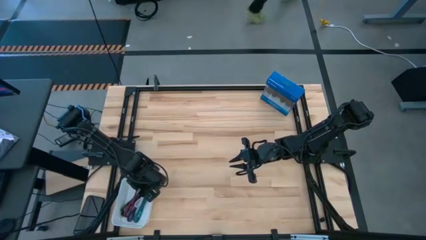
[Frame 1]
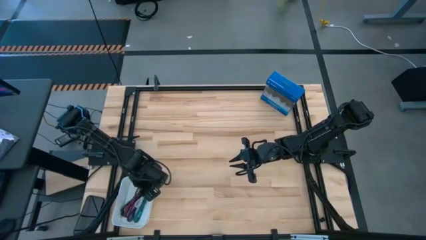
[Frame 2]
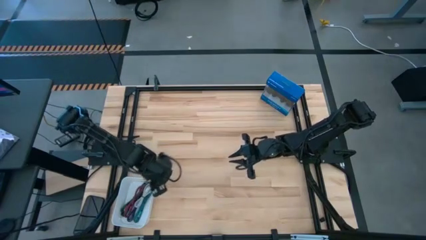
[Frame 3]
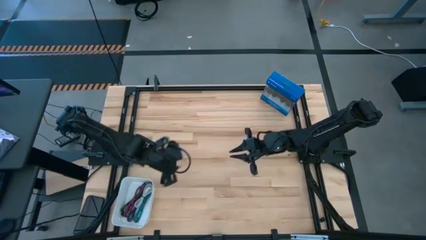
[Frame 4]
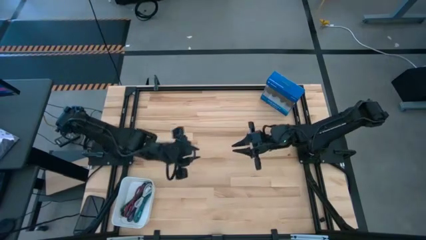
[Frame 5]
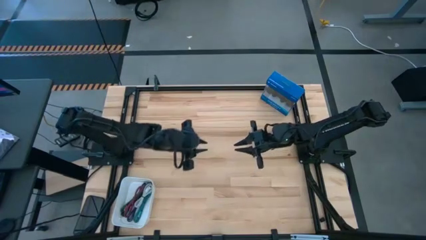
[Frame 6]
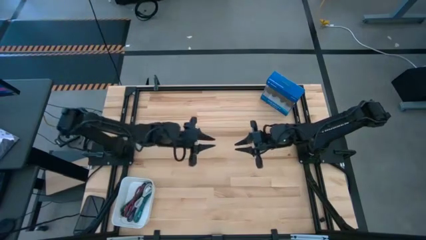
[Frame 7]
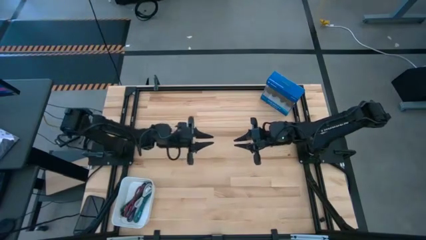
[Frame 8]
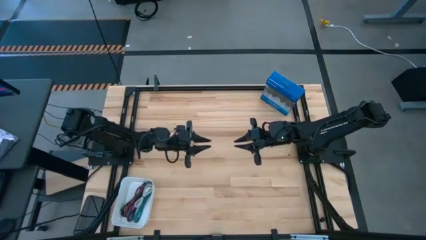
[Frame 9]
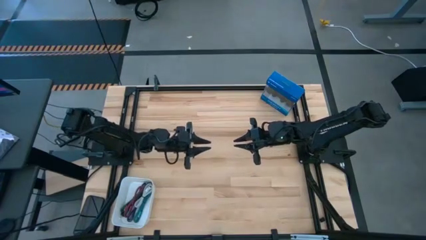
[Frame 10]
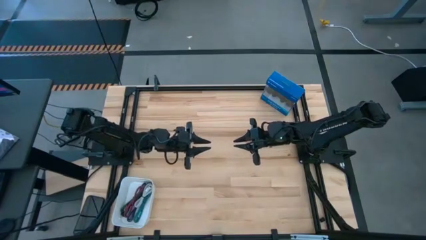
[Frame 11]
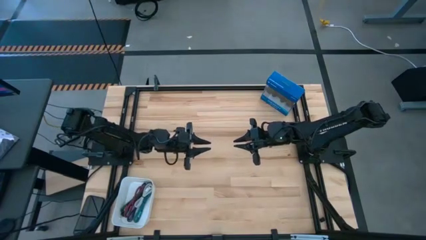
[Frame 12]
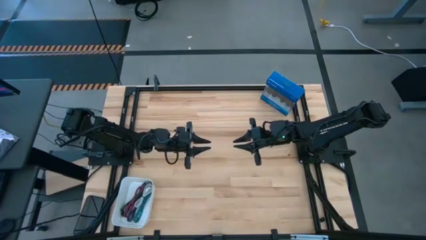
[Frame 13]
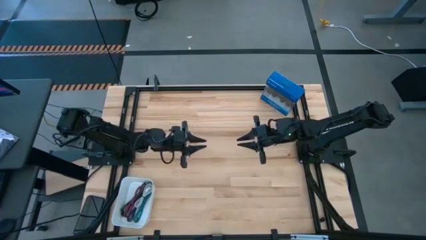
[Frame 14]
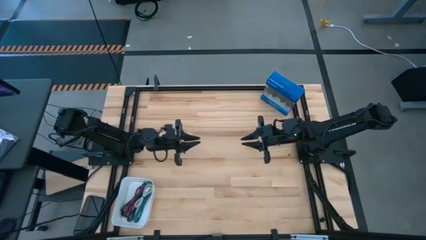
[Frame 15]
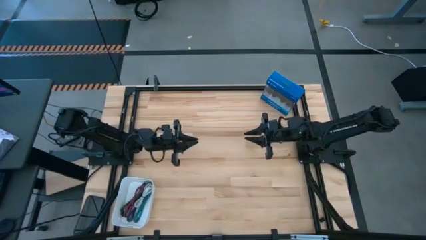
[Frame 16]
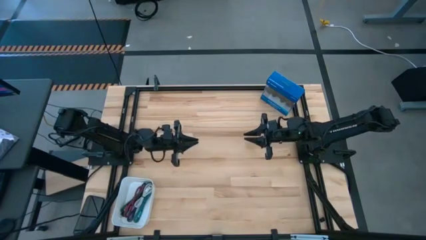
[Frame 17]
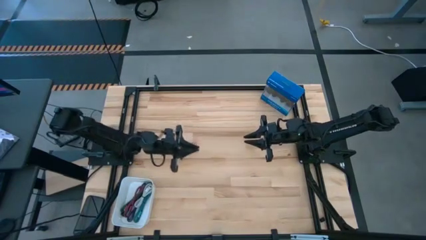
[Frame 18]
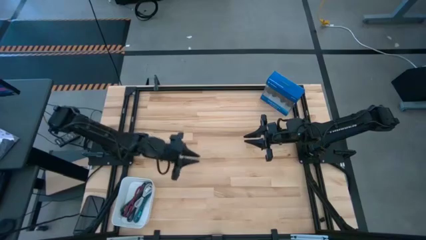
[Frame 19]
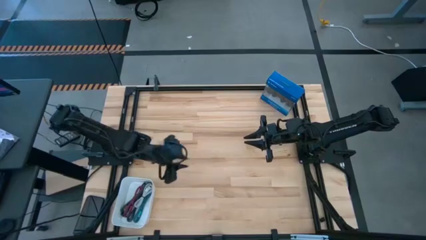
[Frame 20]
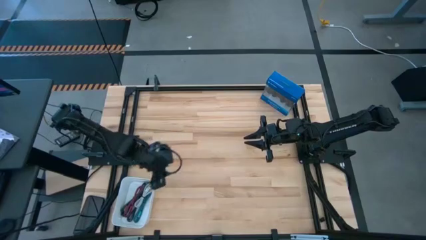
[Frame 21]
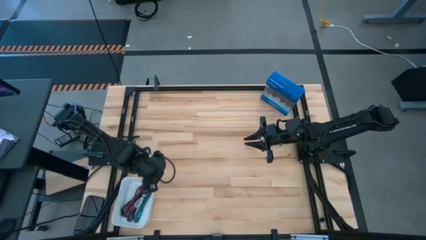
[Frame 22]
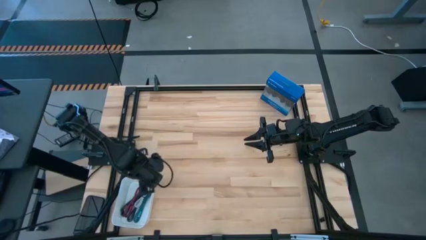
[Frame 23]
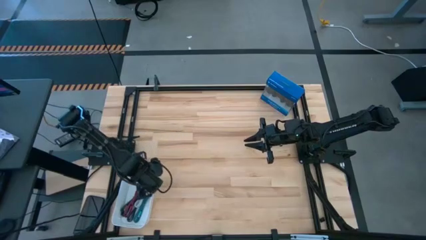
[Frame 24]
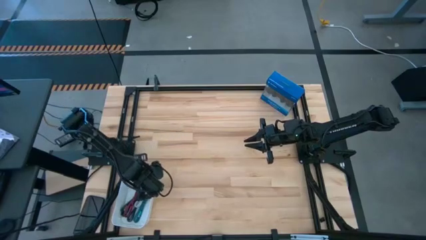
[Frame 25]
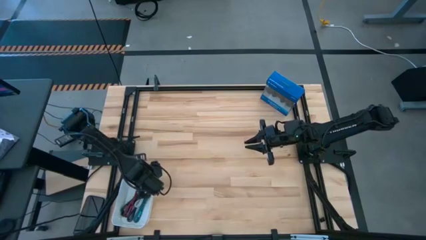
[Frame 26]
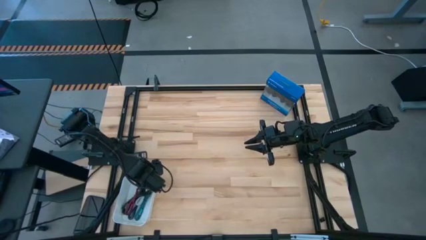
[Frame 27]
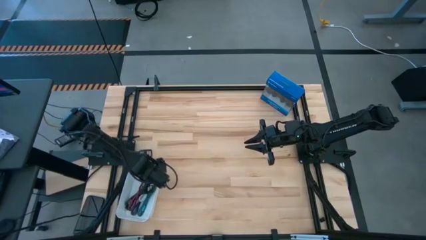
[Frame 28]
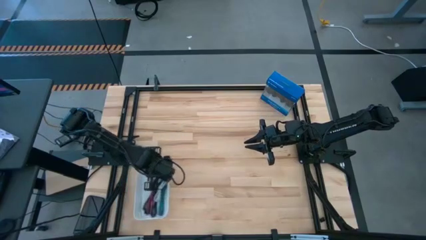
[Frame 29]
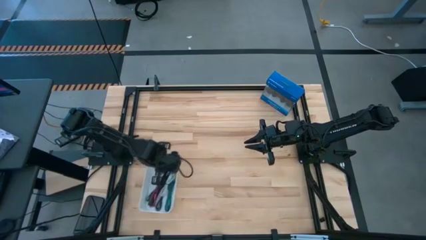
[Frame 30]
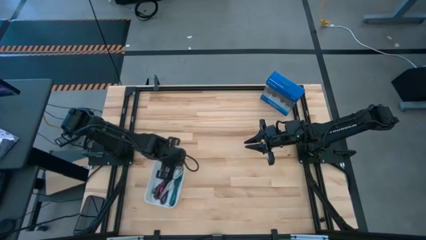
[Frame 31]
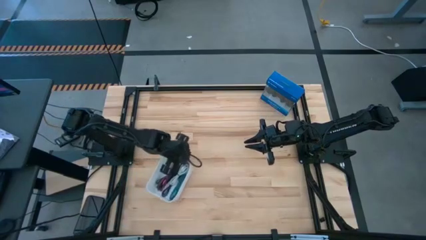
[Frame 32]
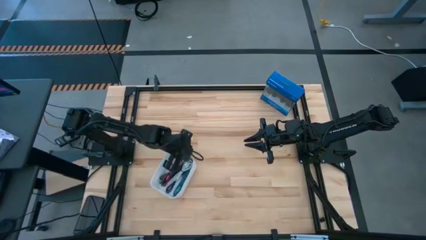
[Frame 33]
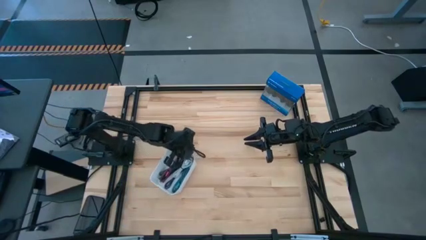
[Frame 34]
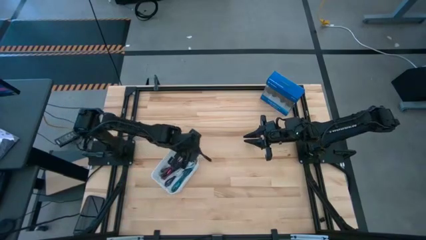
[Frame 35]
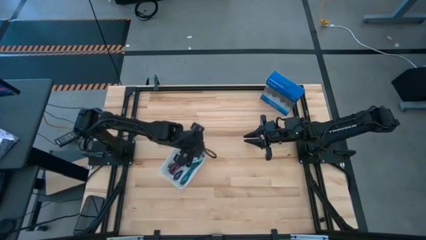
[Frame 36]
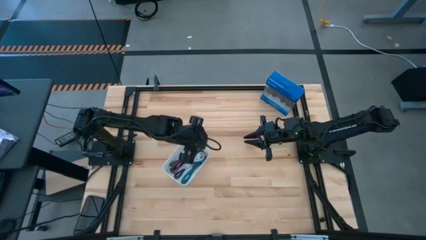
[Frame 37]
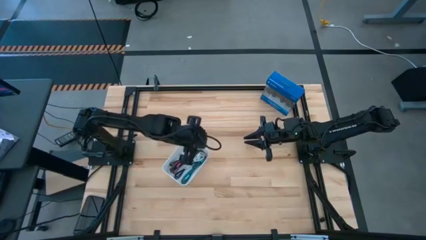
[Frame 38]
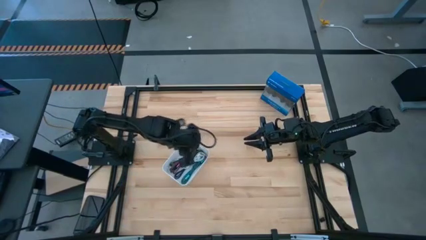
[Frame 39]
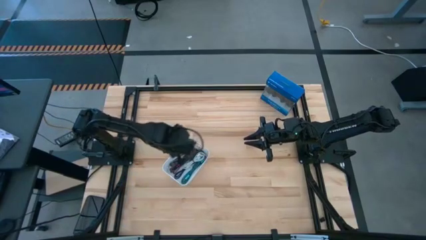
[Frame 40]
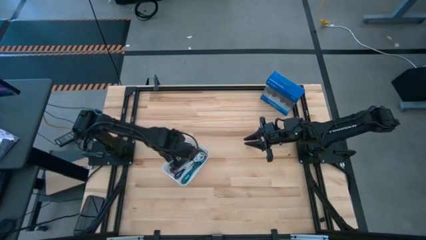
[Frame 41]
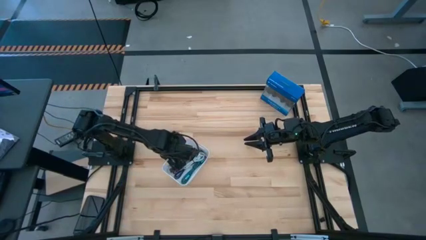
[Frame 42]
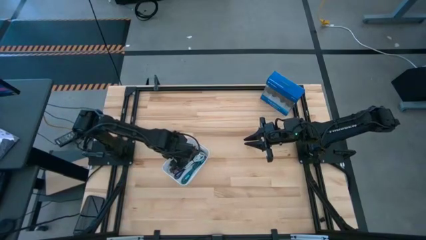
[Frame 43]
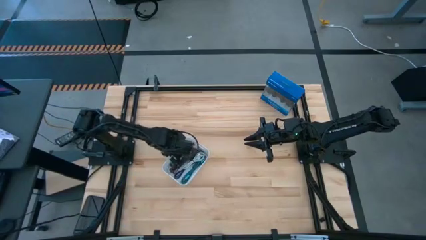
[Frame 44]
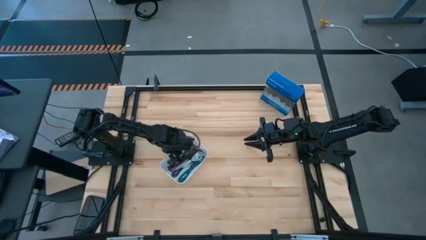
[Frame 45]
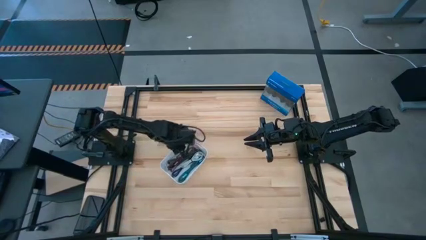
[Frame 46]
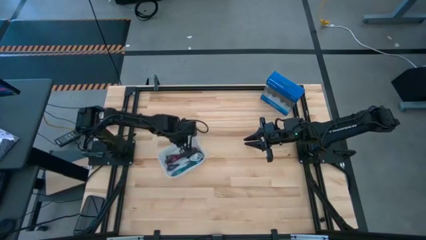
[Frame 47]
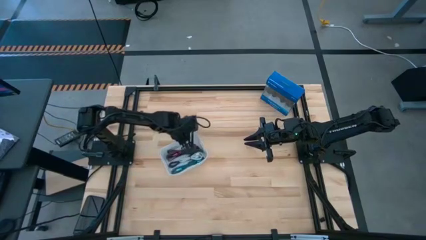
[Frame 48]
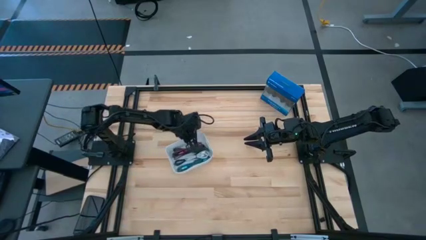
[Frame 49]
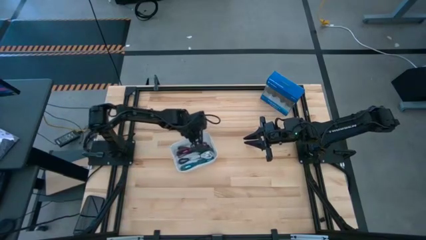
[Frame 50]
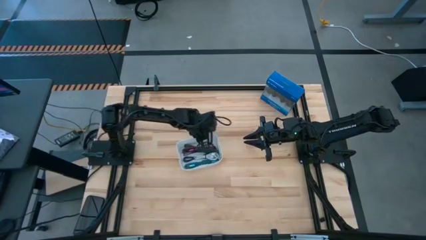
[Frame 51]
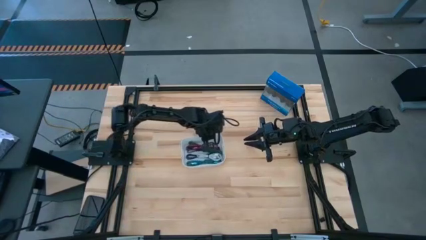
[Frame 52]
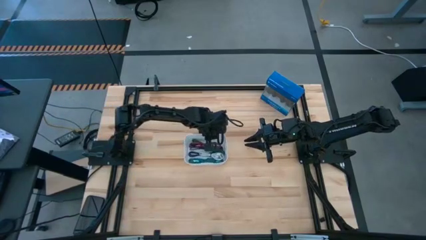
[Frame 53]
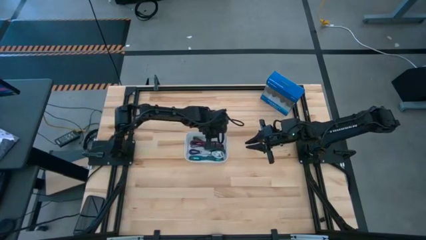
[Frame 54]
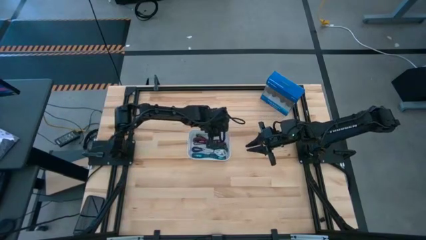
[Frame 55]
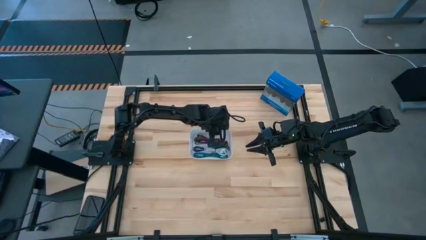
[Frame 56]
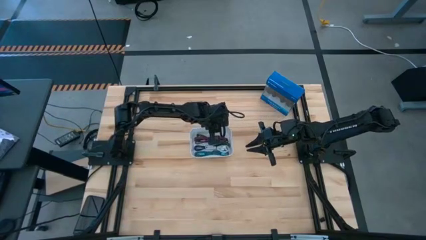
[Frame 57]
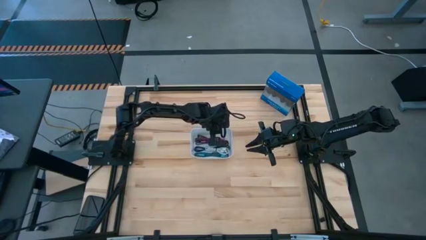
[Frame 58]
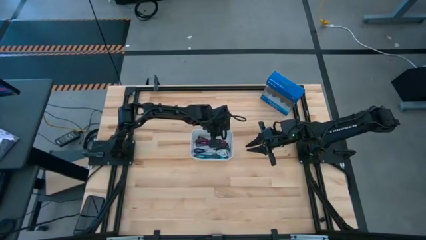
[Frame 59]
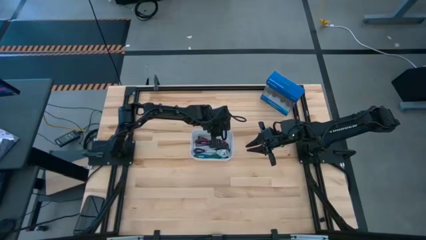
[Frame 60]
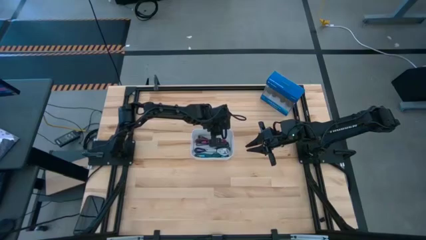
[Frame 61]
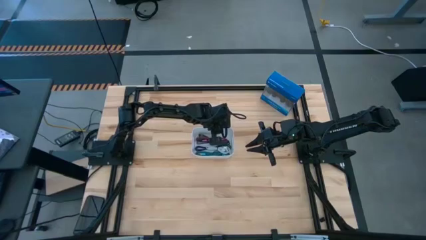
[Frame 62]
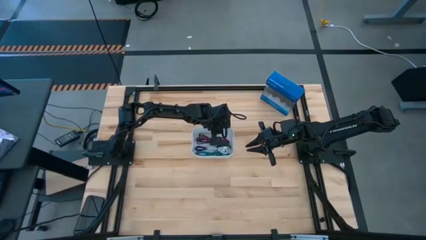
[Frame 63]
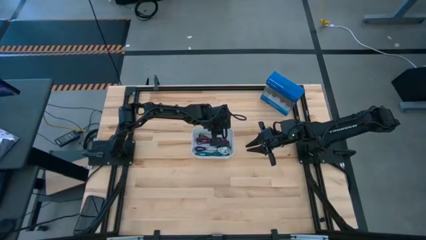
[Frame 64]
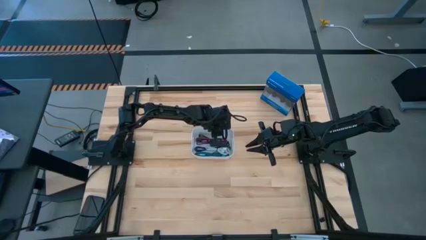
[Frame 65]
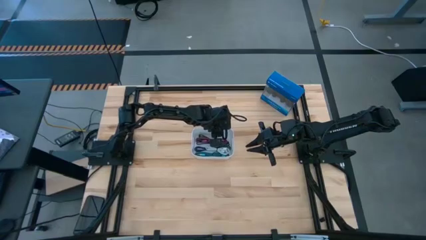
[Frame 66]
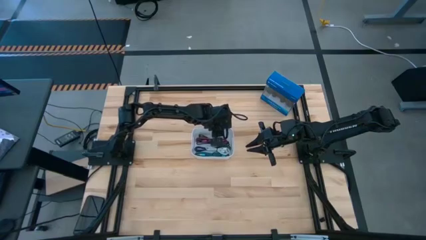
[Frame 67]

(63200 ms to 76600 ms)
Task: Pick and place USB-C Cables
Move the white bin to the center of the table

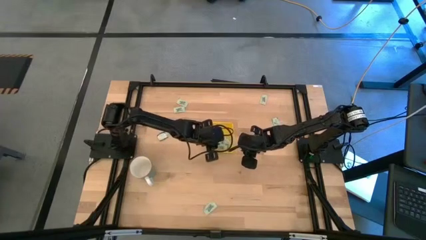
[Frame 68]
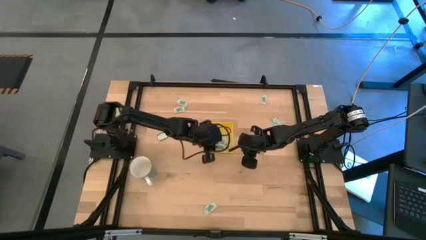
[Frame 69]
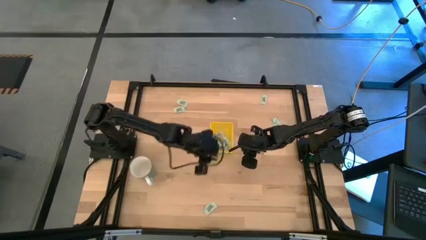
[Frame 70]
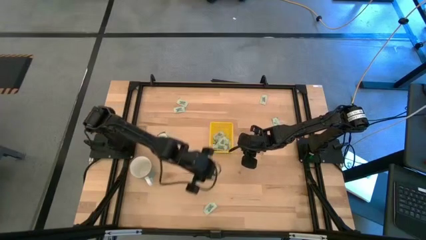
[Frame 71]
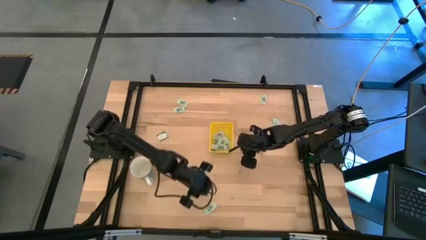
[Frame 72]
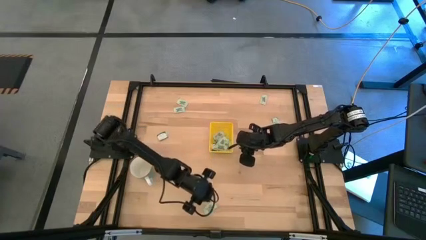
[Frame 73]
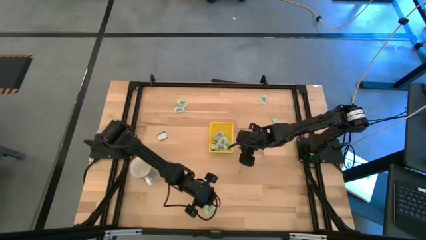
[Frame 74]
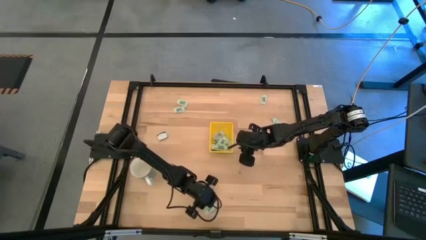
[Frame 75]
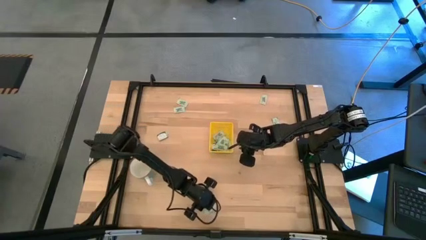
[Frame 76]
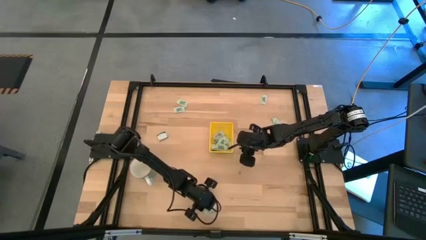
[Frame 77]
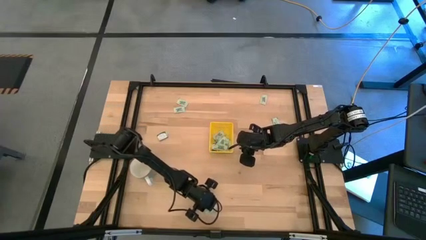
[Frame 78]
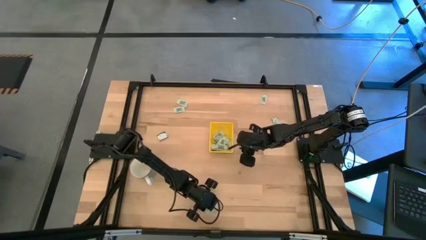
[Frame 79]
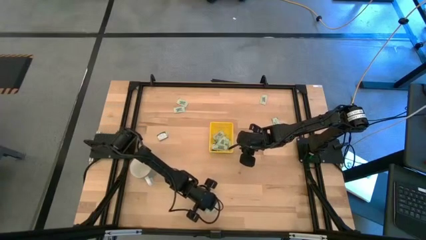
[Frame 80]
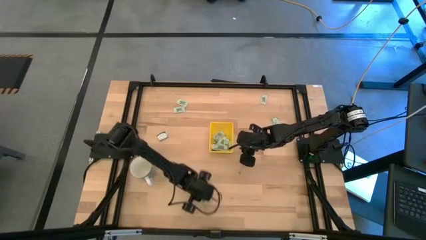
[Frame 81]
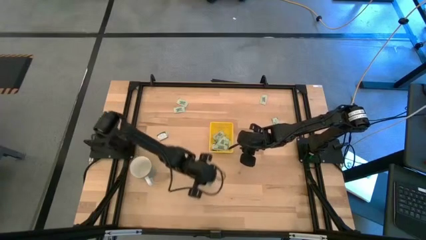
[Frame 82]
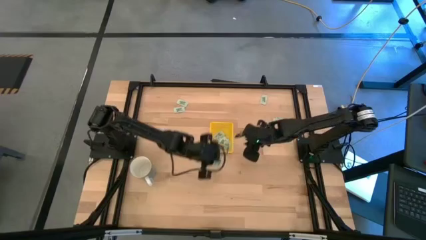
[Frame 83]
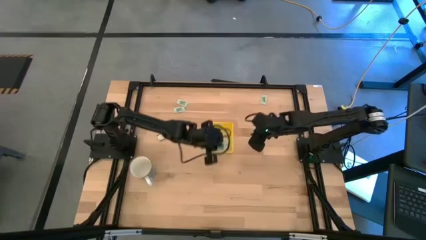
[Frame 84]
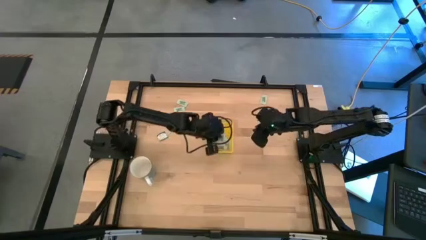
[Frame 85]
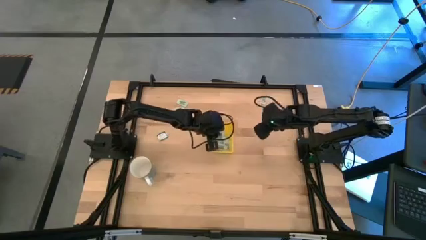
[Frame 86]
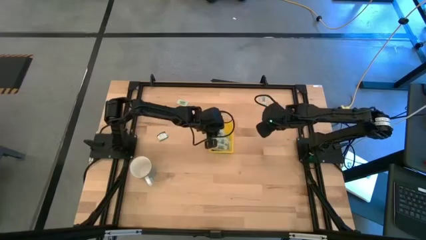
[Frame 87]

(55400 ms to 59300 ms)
Task: Pick and place Stevia / Truvia into bins
Put the white stevia packet into the yellow bin
